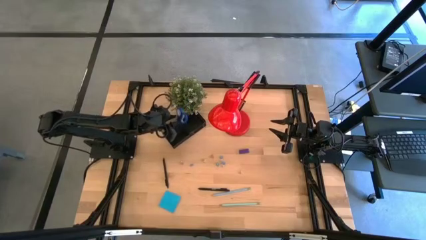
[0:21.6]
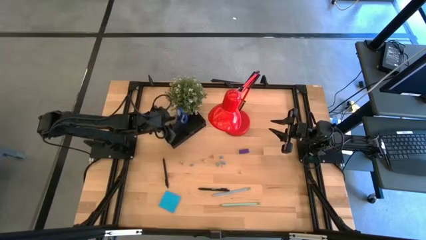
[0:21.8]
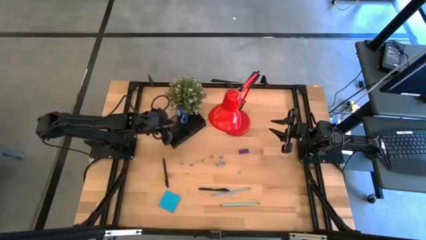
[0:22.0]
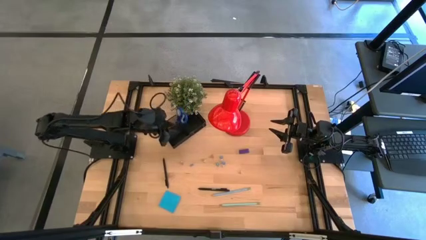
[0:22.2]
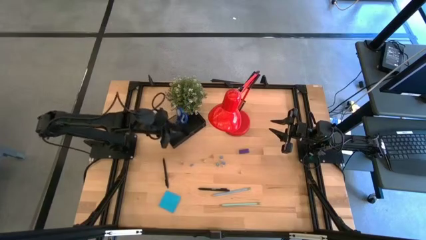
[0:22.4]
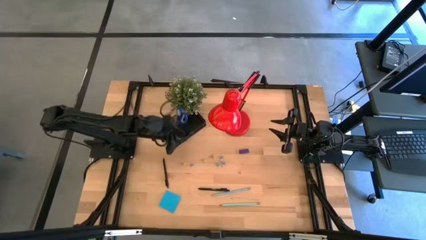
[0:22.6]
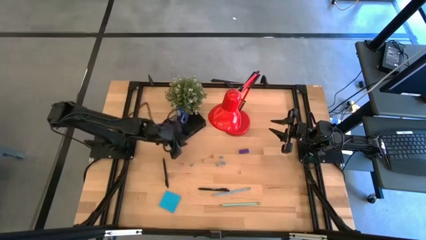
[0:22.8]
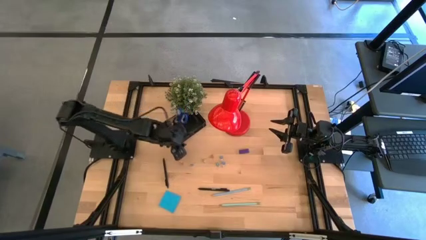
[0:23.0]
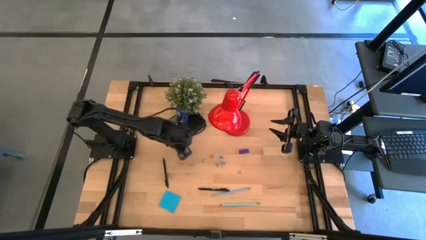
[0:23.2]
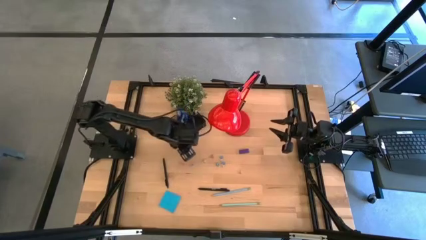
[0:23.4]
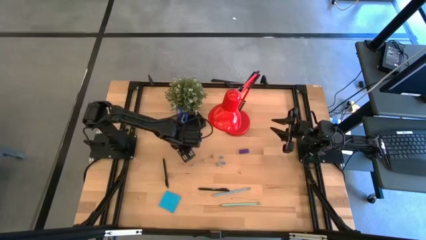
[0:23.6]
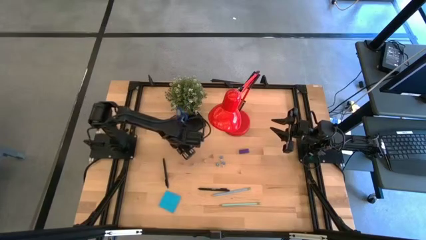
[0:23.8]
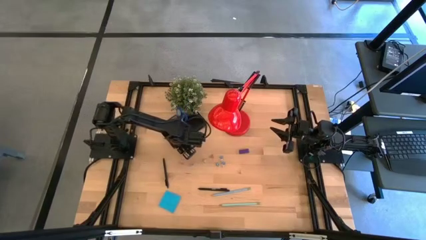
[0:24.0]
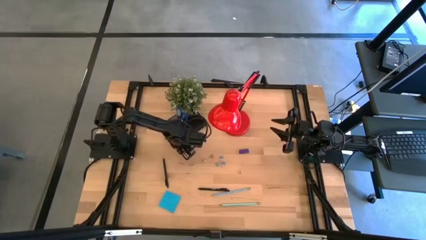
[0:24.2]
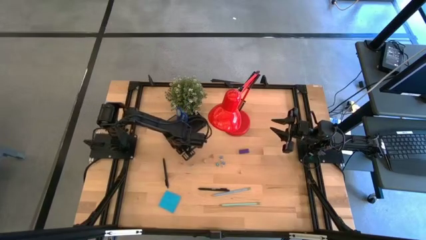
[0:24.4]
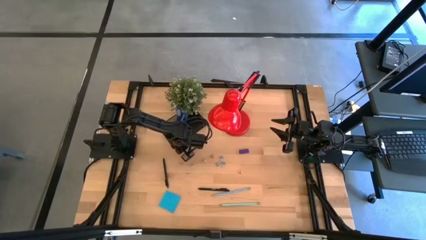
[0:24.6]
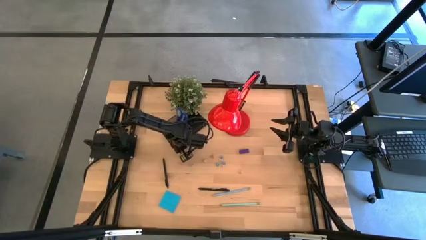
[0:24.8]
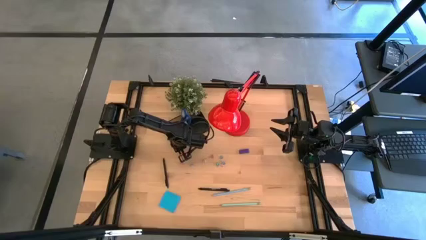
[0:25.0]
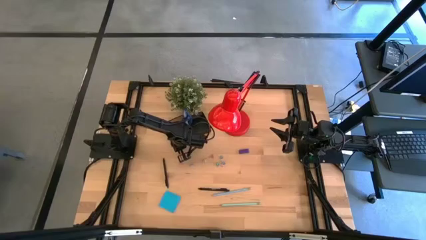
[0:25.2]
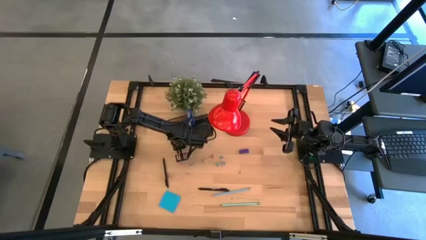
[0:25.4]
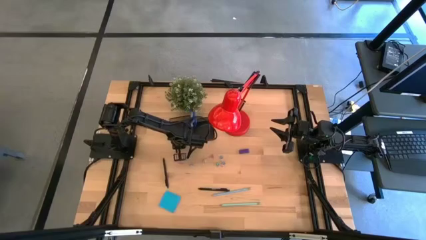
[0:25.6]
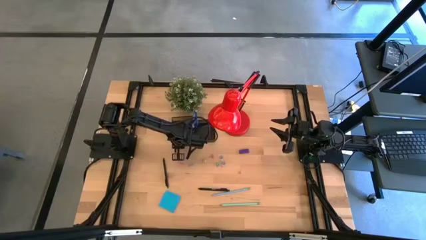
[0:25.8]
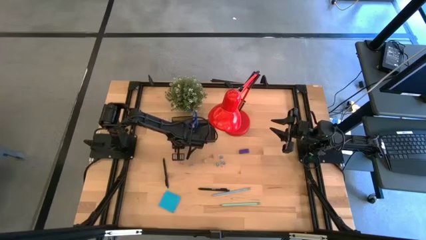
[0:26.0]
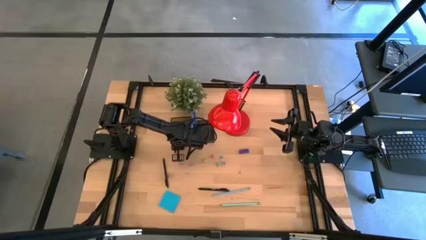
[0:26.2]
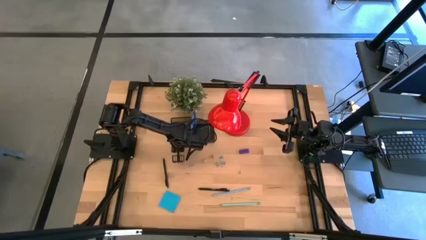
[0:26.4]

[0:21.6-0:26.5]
Task: Pick and place office supplies into organizer
Adjust the black desk organizer

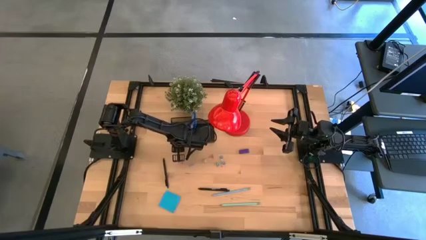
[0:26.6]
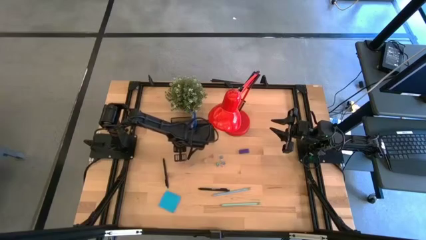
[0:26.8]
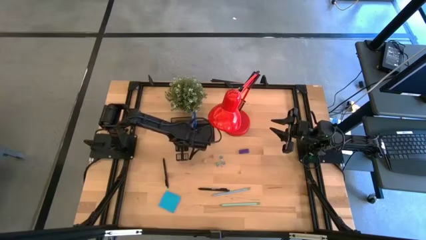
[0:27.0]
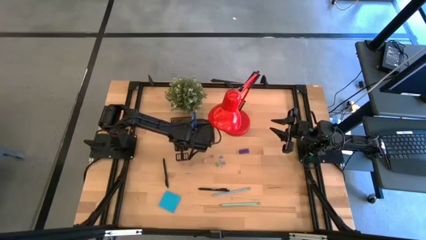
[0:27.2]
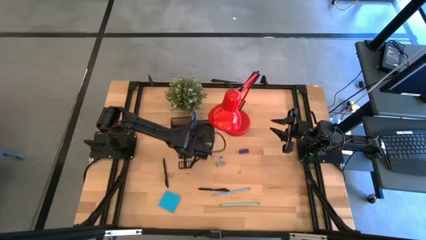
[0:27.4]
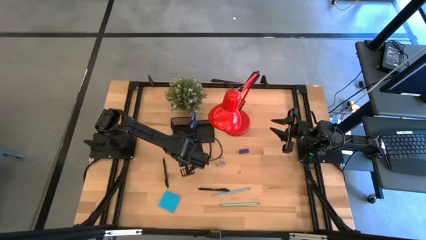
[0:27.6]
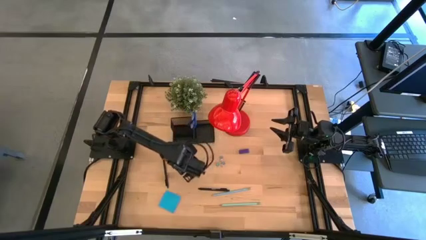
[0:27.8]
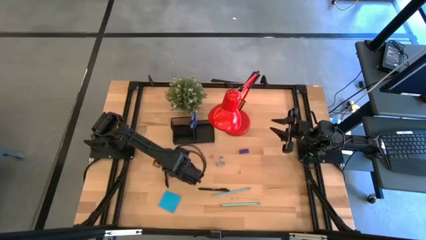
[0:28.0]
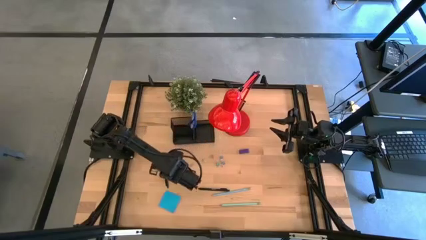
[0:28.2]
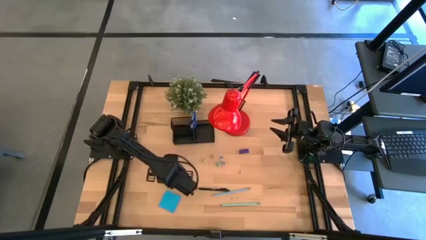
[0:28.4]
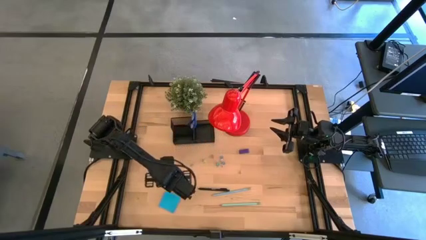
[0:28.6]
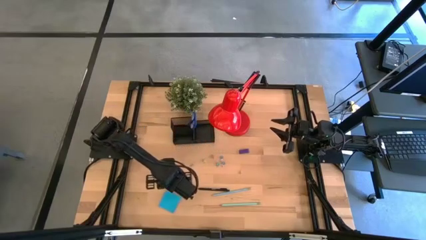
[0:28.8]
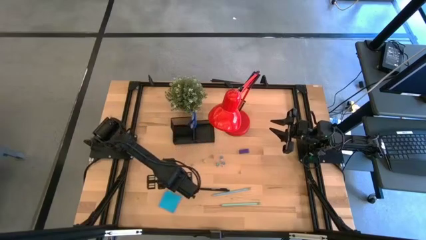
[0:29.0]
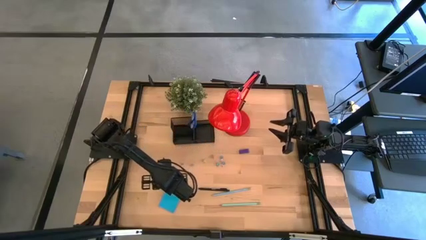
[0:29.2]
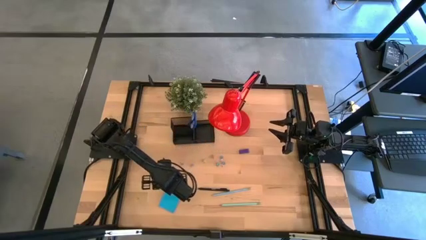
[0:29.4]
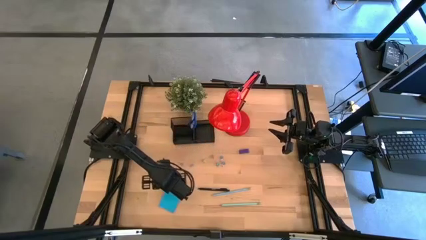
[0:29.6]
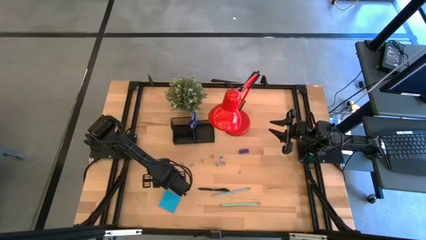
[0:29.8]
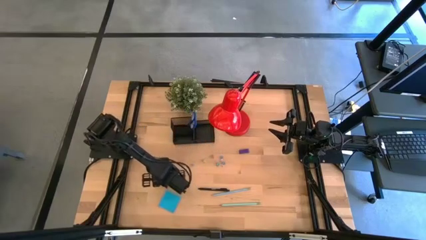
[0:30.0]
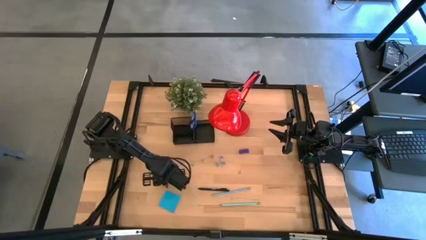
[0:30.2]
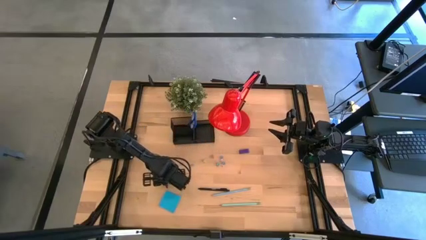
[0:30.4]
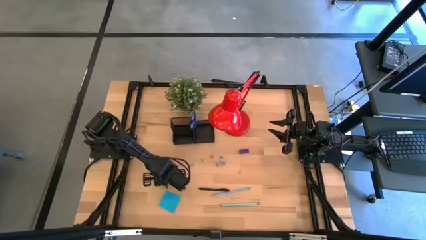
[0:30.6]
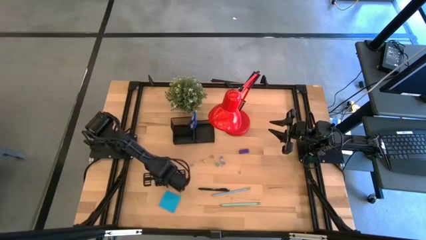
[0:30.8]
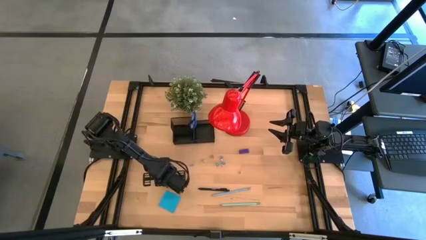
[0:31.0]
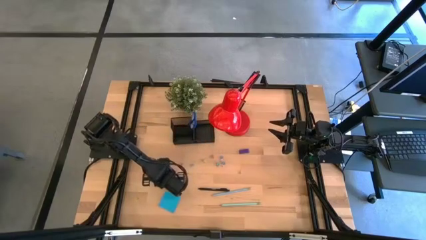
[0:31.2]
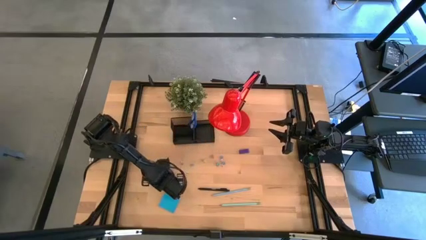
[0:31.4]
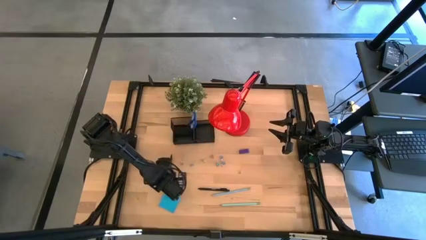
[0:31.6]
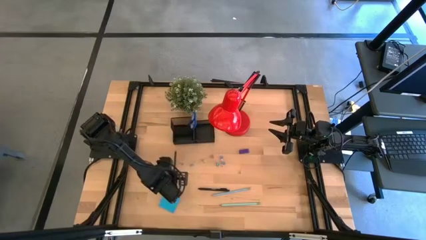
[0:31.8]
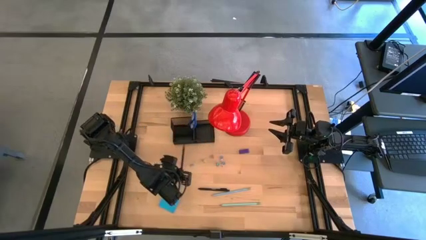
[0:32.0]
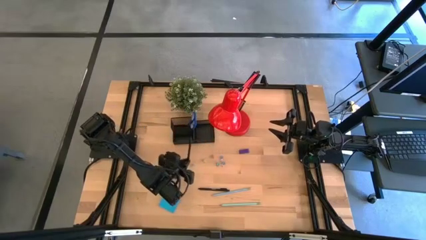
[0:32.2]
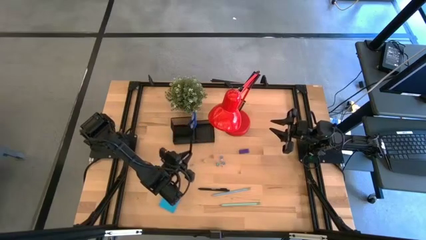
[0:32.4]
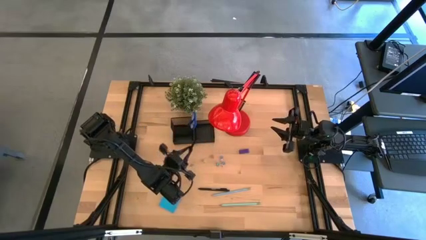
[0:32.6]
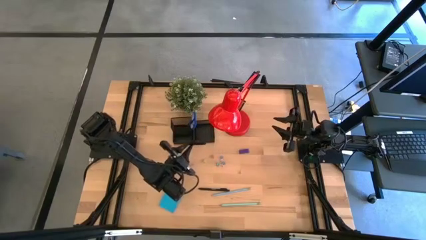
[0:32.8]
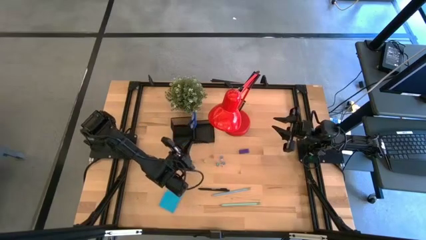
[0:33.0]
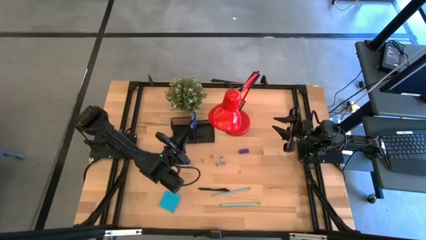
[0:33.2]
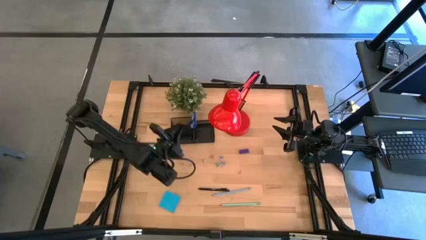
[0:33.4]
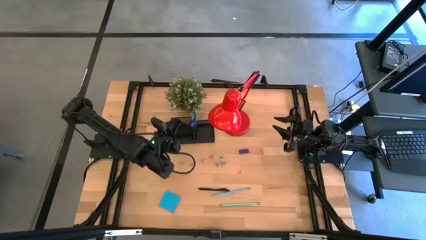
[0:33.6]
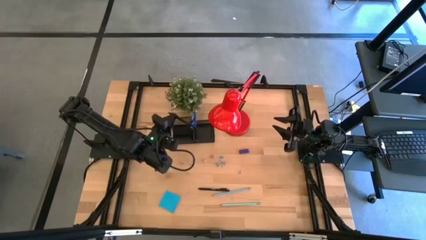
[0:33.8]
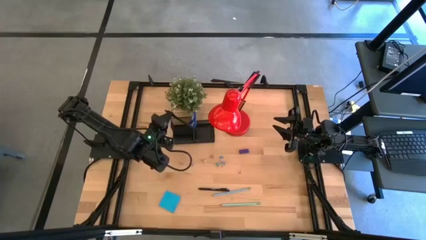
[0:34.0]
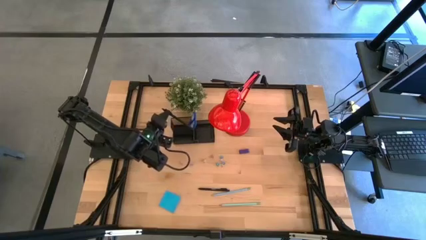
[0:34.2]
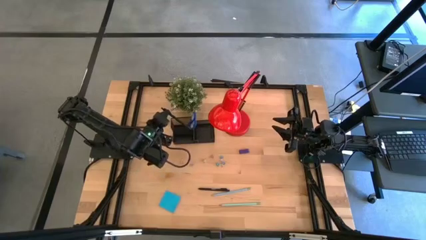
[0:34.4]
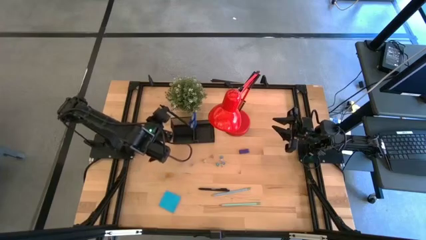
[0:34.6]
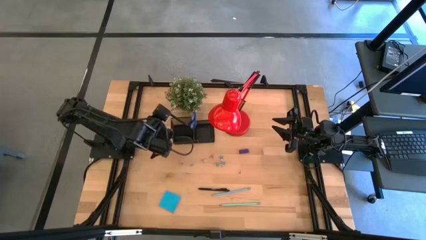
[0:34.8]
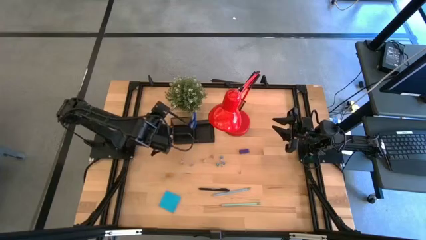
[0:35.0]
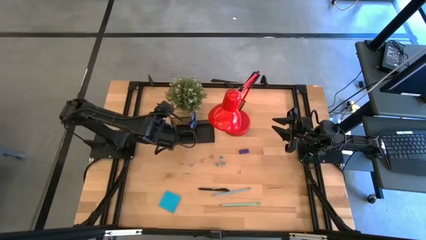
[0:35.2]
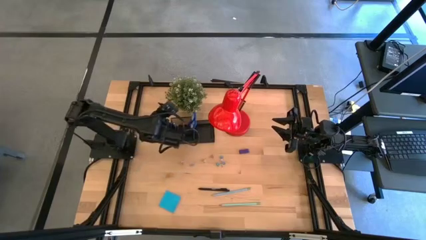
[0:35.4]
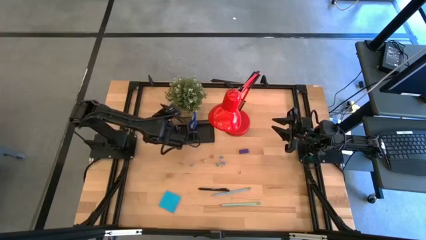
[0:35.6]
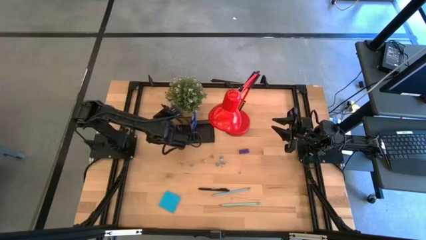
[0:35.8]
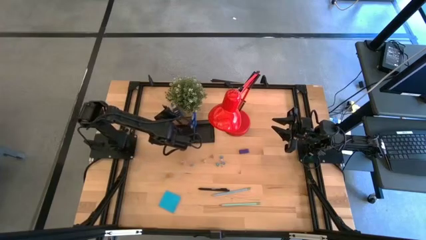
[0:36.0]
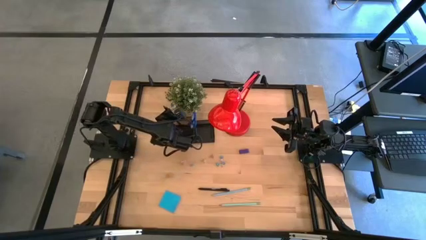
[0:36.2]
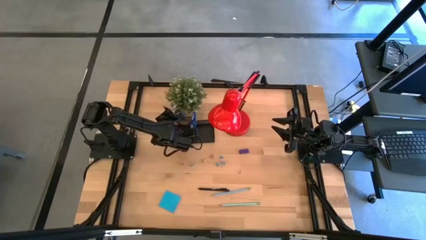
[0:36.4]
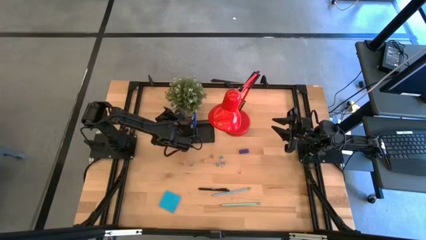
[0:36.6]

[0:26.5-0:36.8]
Put the left black pen into the black desk organizer
